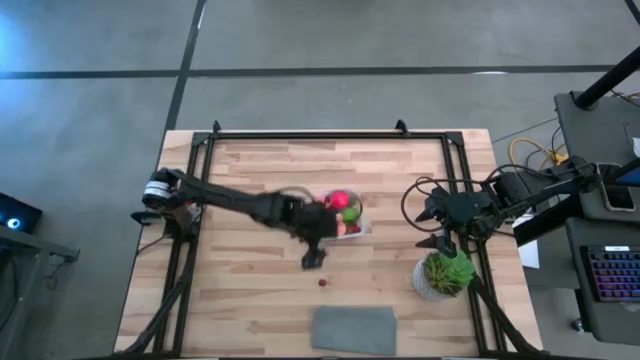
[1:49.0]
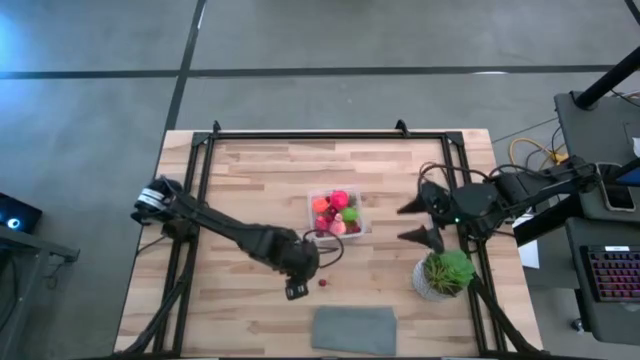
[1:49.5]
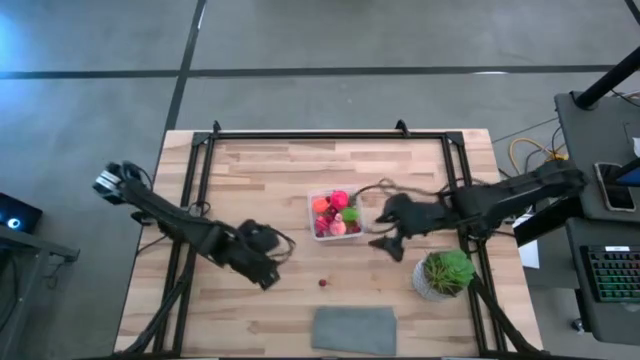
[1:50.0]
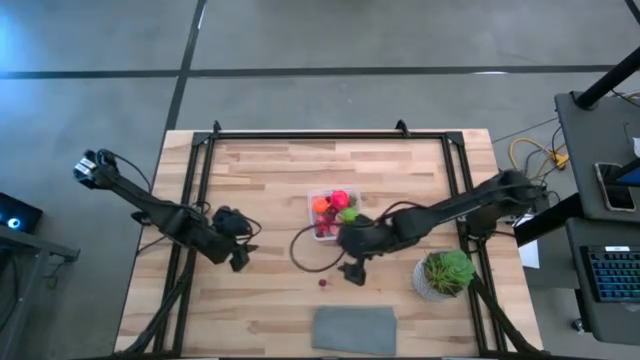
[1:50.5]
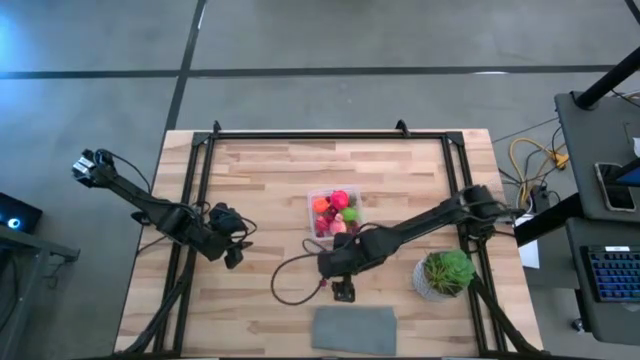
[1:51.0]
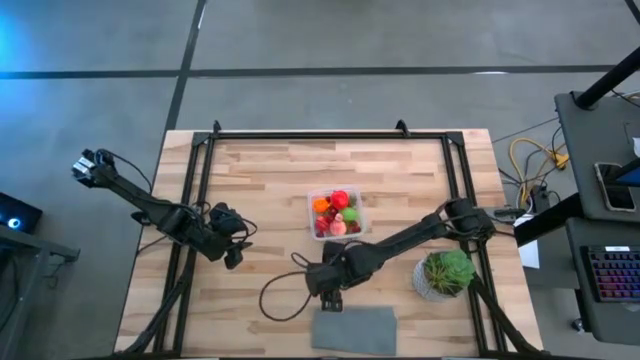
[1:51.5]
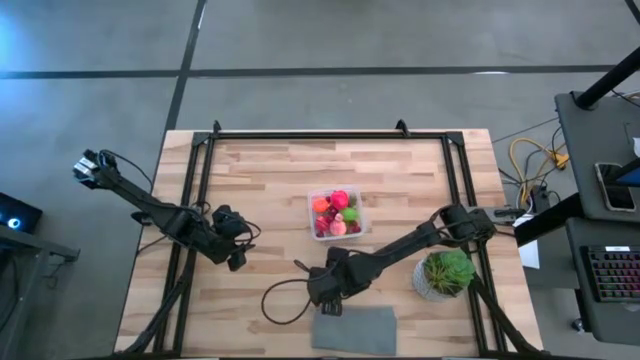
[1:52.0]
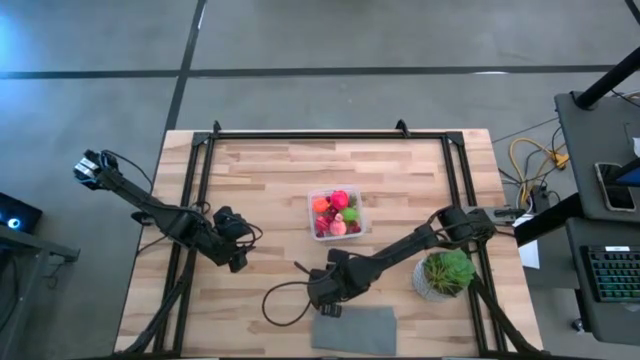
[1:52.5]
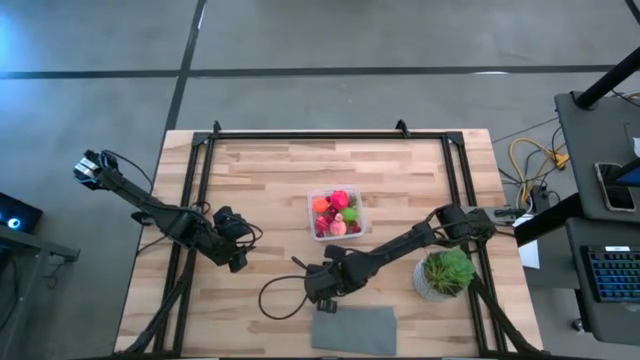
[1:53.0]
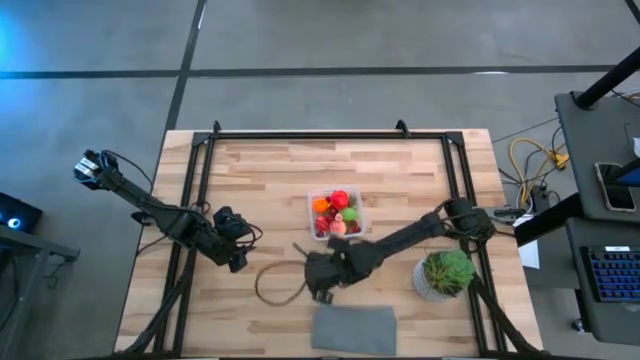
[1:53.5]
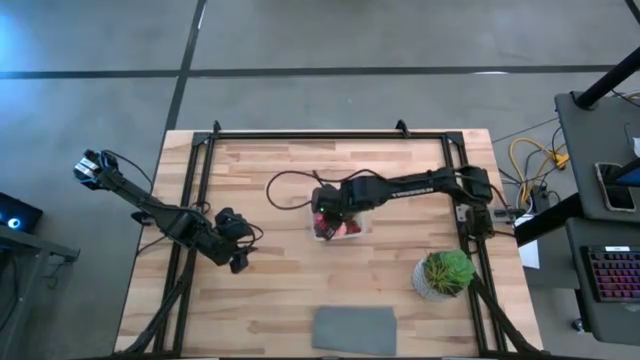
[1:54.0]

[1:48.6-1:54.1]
Task: Pick and placing Produce into tupperware
Put the red cherry into the transparent container

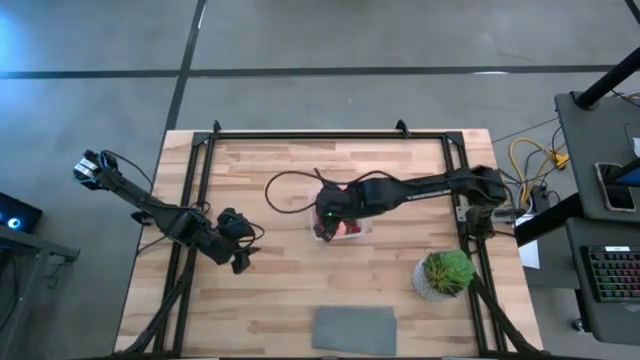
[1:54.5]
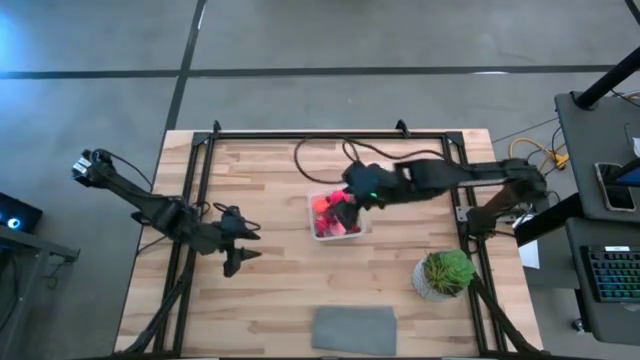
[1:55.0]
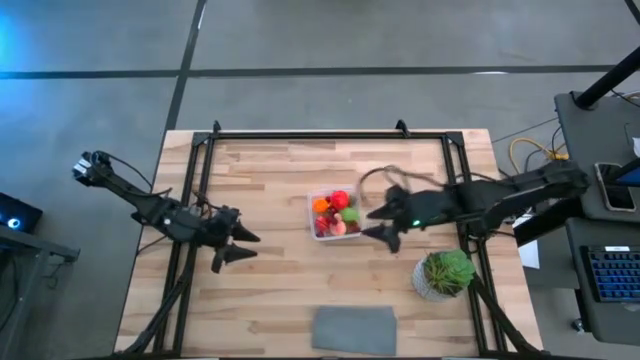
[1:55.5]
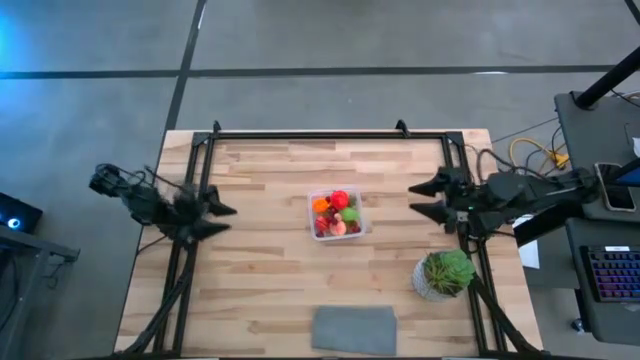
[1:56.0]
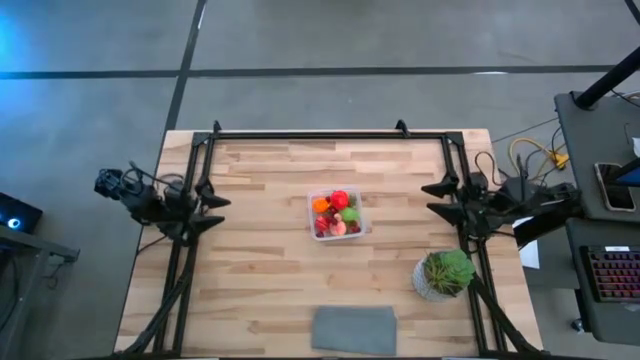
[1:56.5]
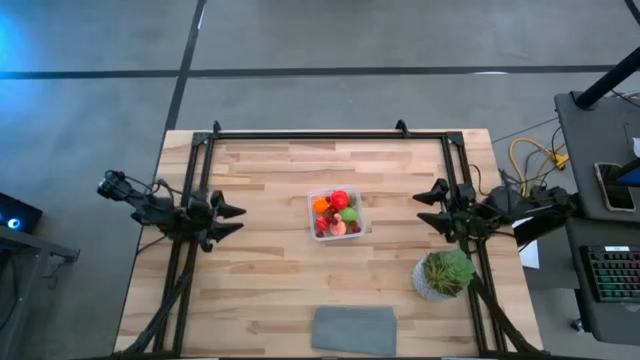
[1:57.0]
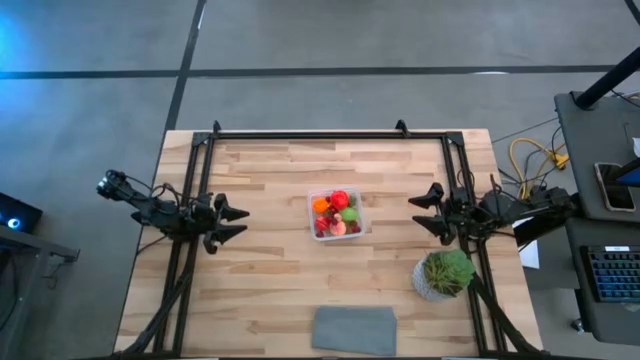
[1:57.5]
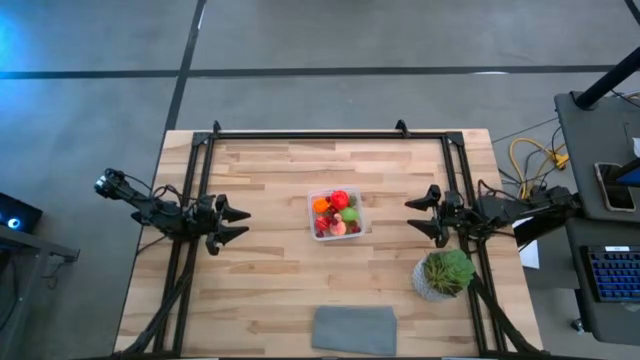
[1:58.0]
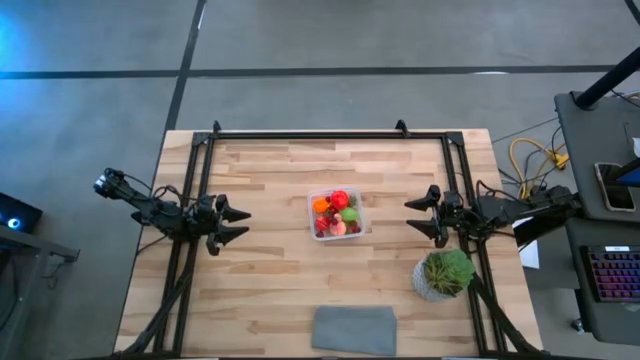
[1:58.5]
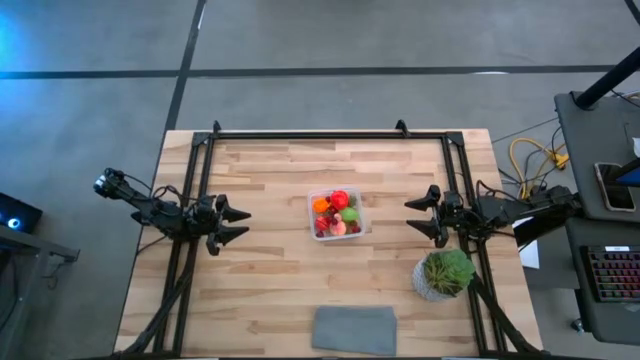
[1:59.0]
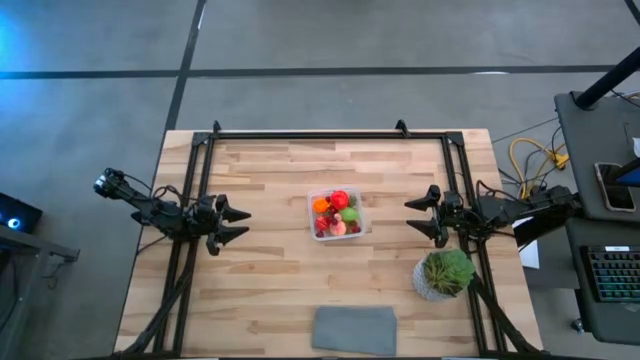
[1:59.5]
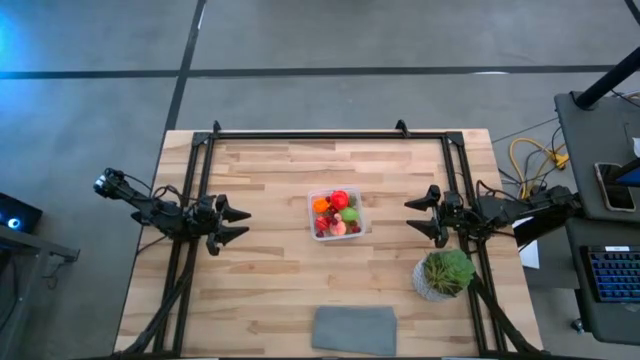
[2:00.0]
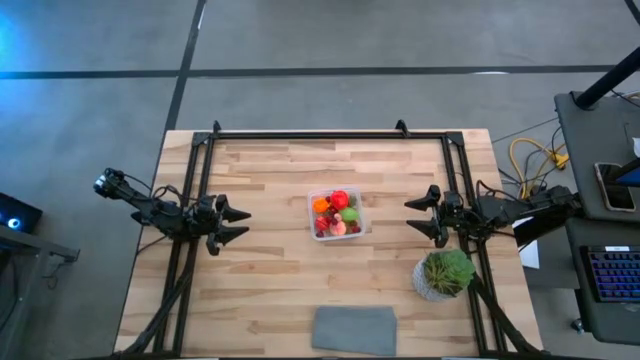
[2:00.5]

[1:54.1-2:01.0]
Return to Home Position

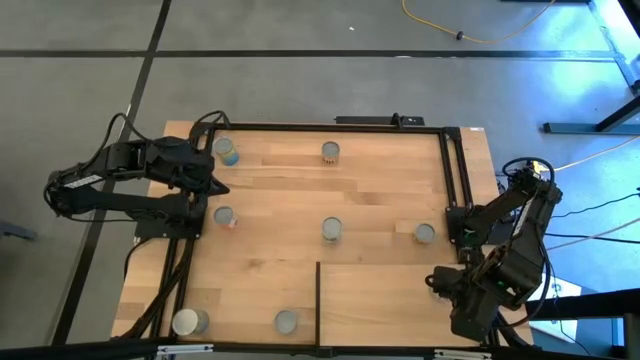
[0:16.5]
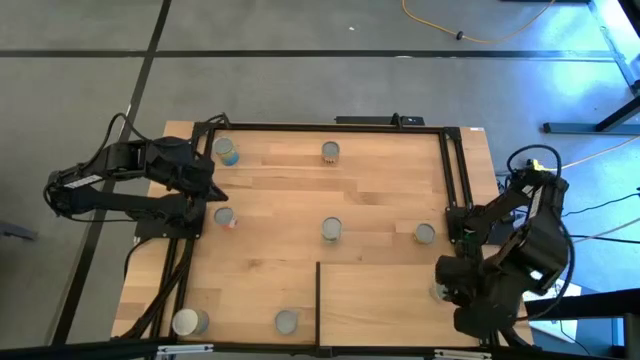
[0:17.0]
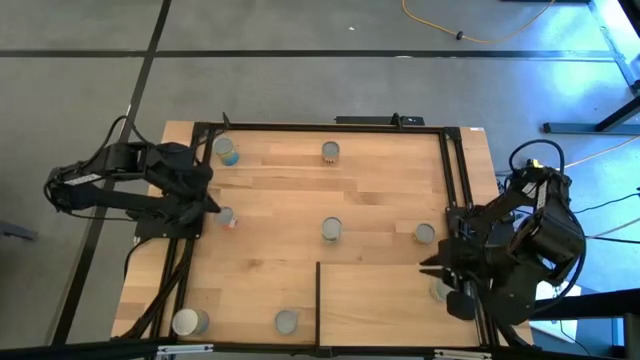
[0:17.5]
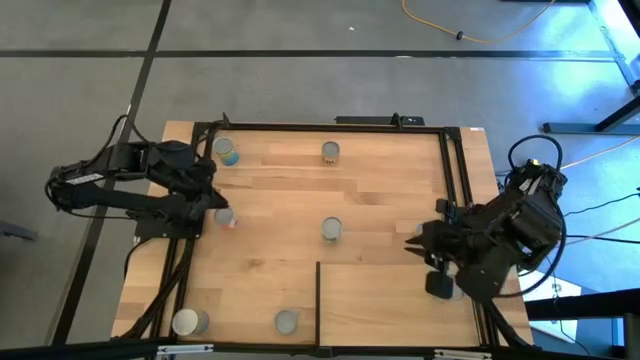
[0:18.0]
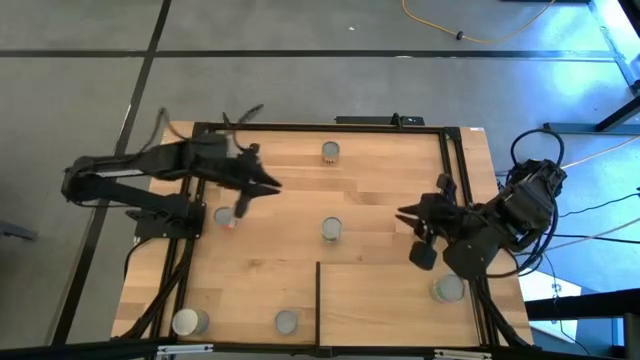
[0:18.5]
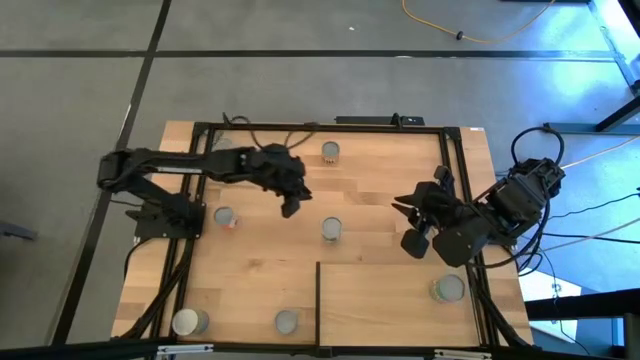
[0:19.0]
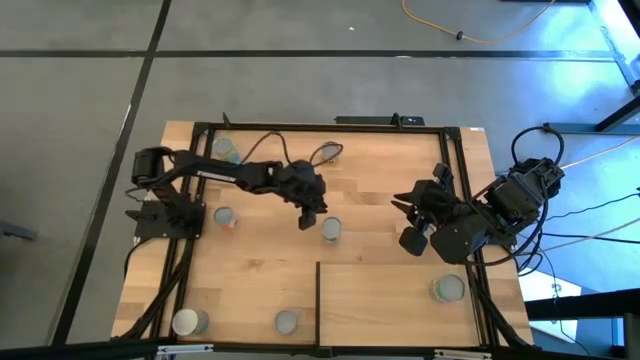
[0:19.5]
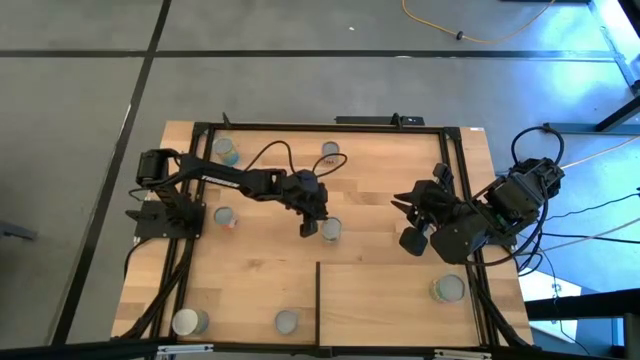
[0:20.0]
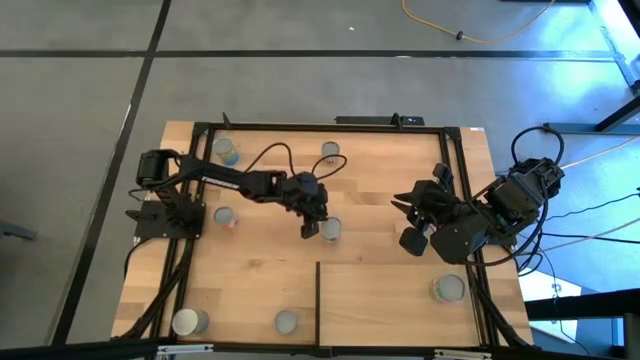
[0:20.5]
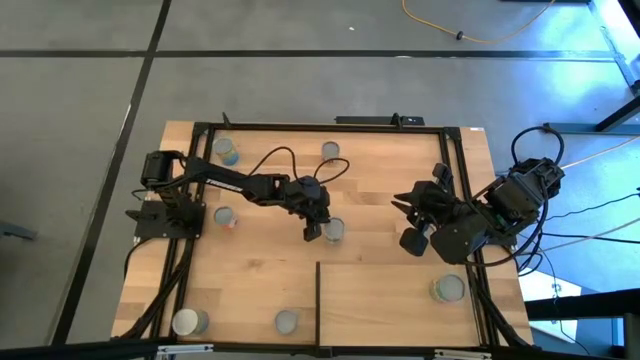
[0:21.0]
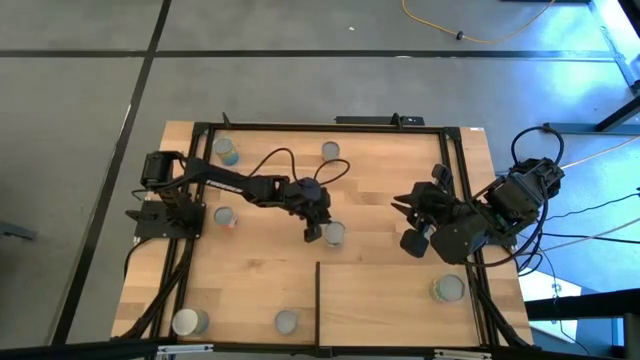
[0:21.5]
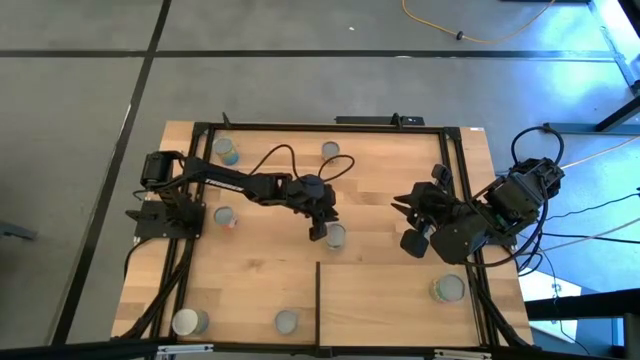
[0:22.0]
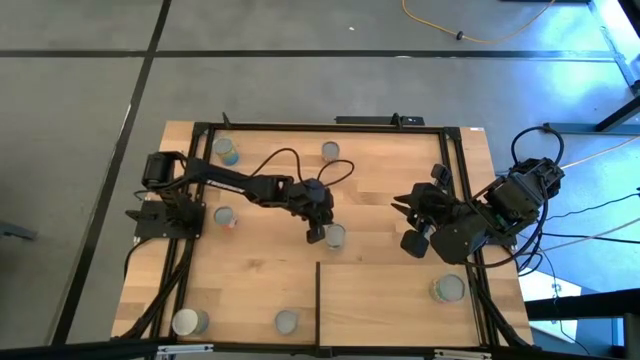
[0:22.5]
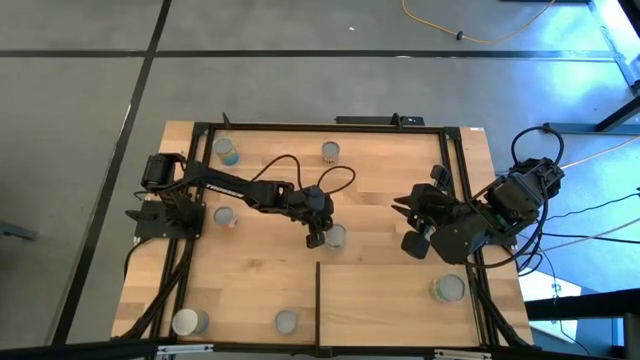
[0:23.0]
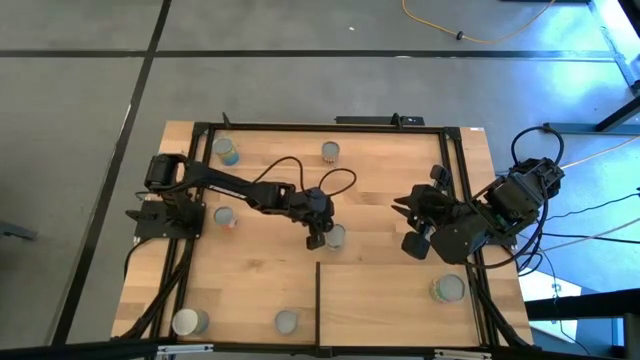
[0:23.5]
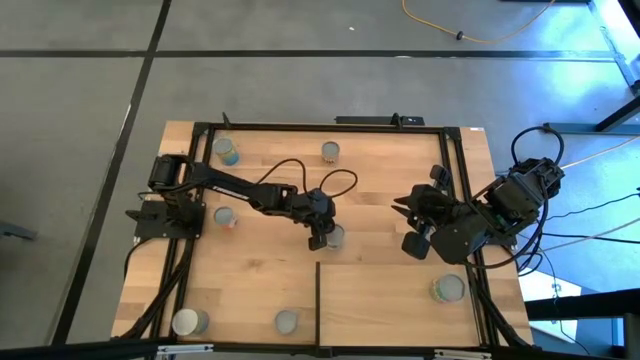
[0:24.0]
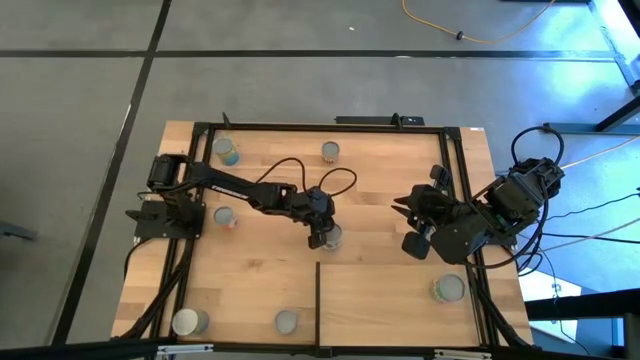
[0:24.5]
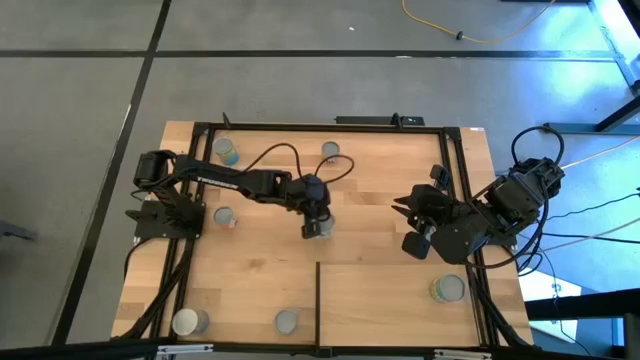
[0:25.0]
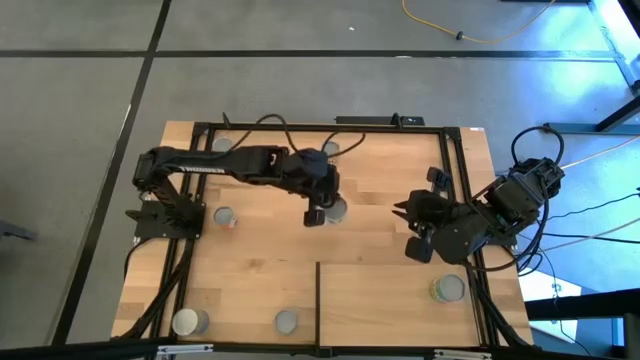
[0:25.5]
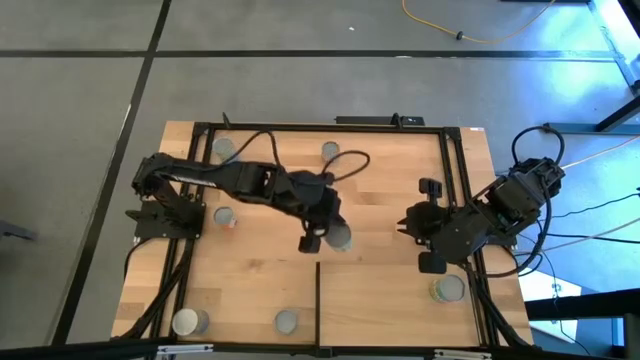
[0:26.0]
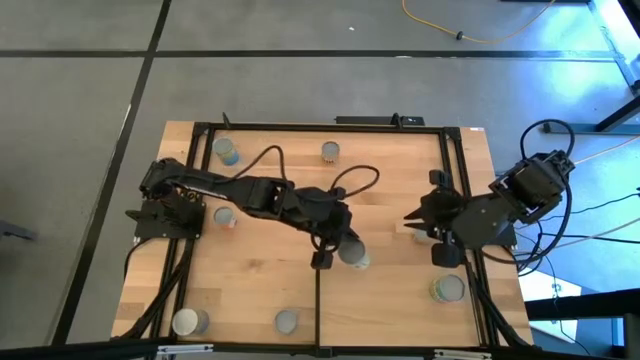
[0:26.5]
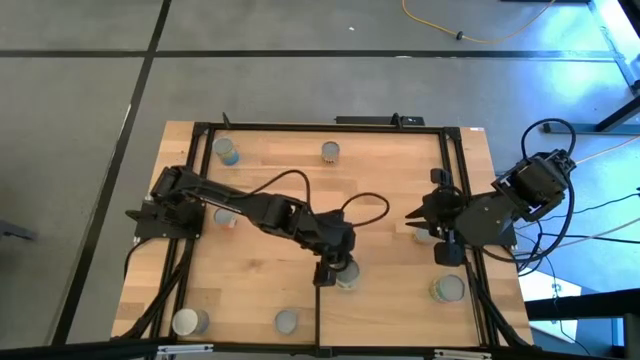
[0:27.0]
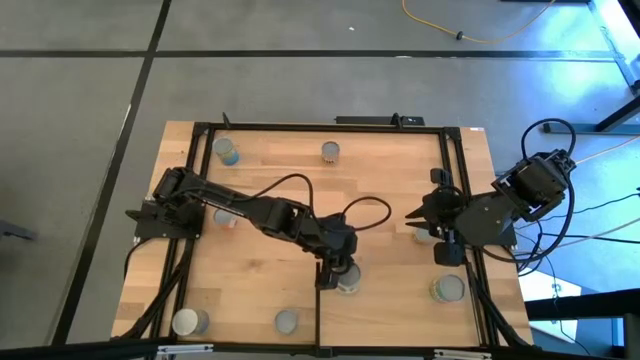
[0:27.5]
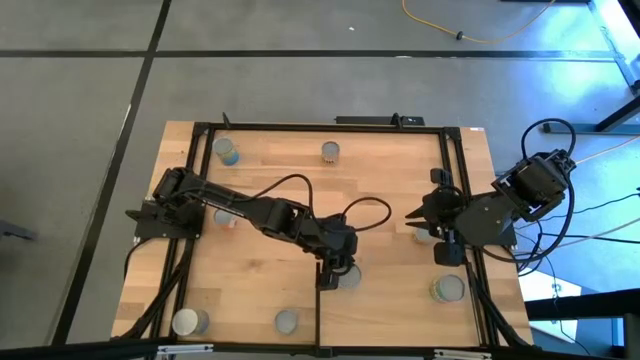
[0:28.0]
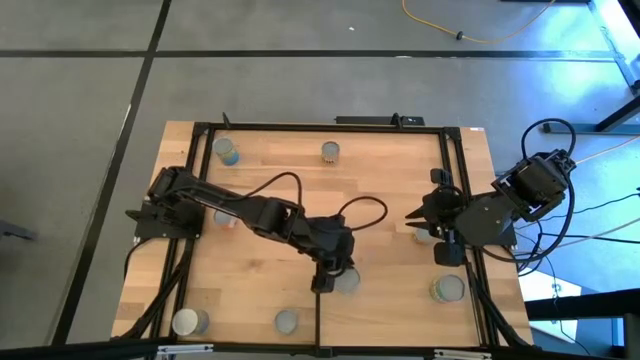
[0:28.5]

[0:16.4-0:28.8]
Task: Pick and place cans onto a shelf
Put the white canned mixed vegetables on the shelf
